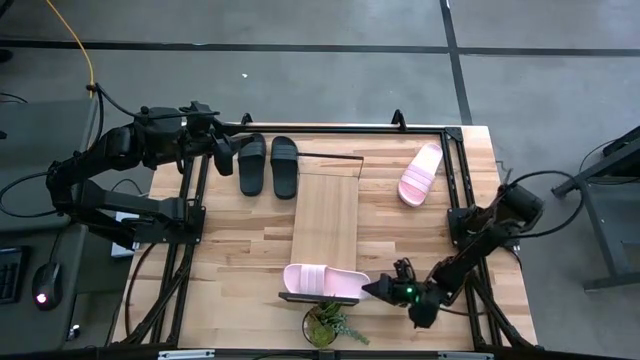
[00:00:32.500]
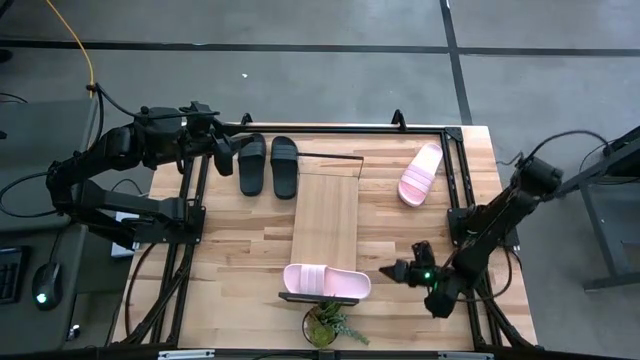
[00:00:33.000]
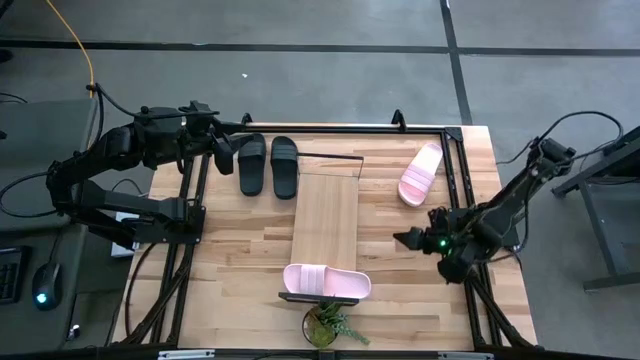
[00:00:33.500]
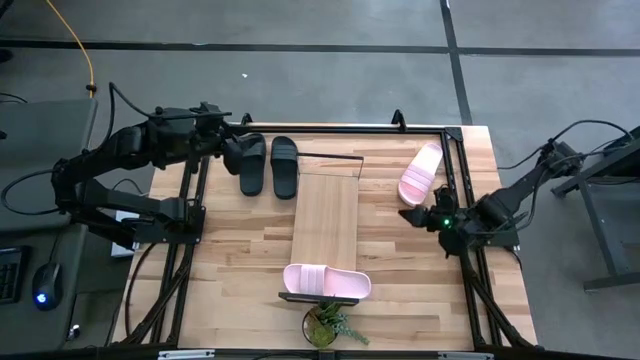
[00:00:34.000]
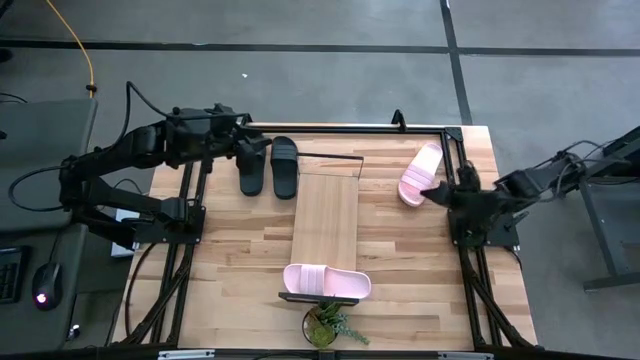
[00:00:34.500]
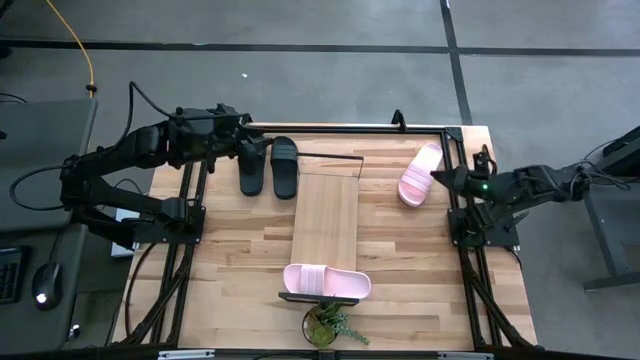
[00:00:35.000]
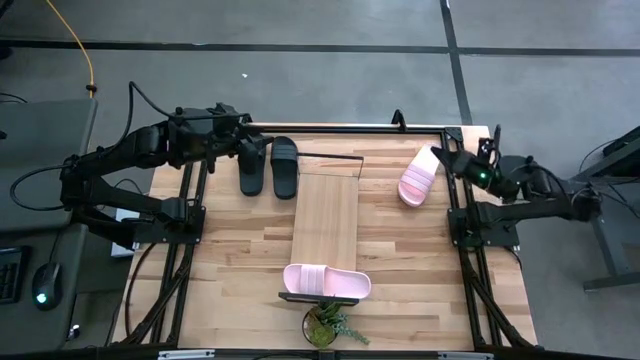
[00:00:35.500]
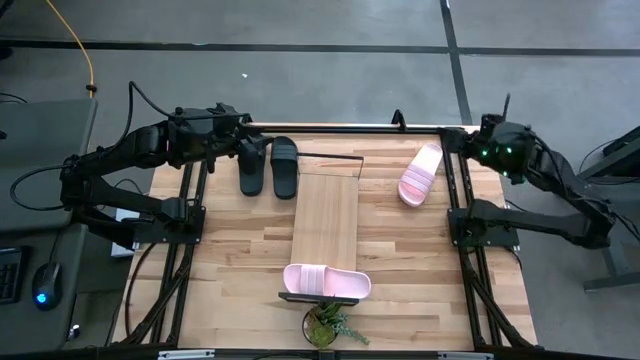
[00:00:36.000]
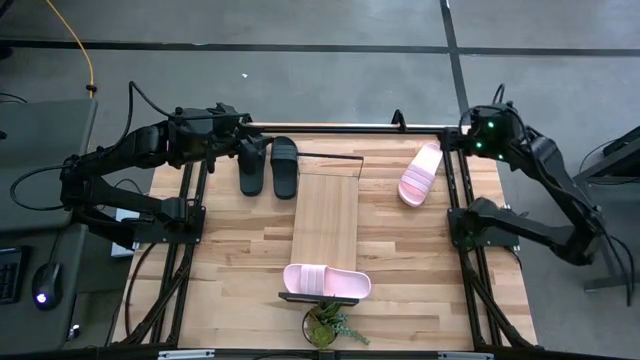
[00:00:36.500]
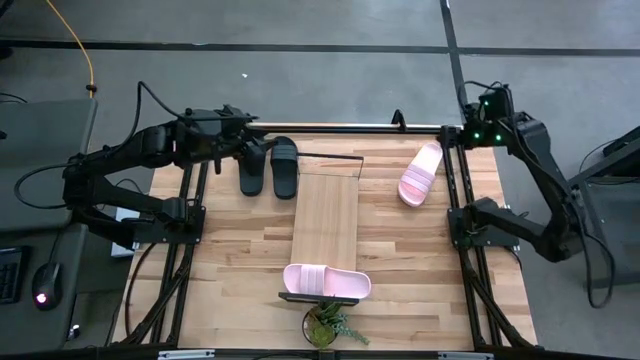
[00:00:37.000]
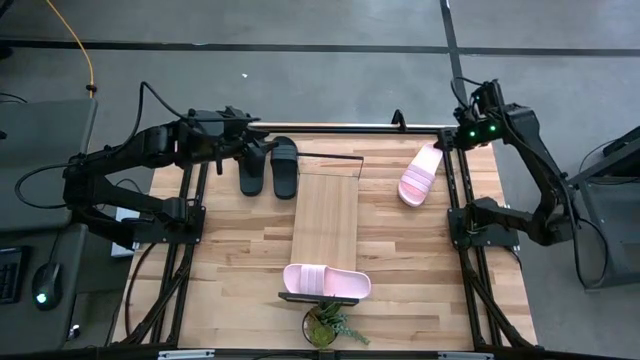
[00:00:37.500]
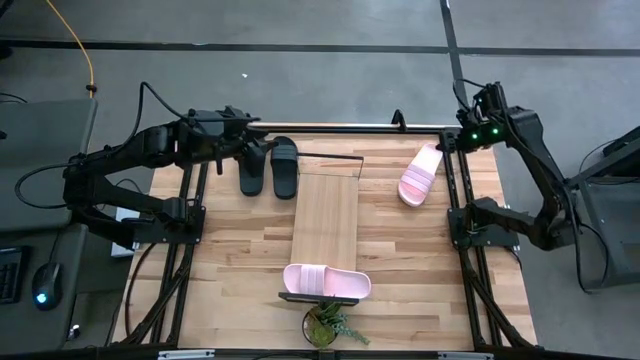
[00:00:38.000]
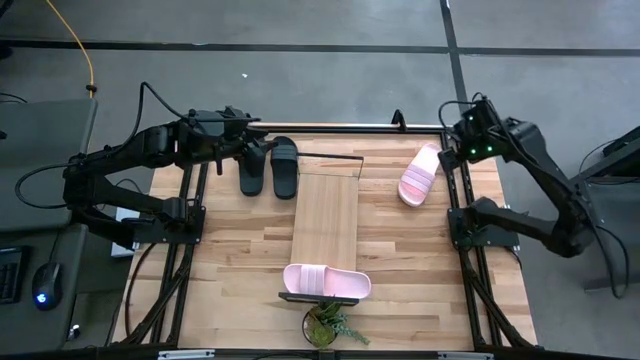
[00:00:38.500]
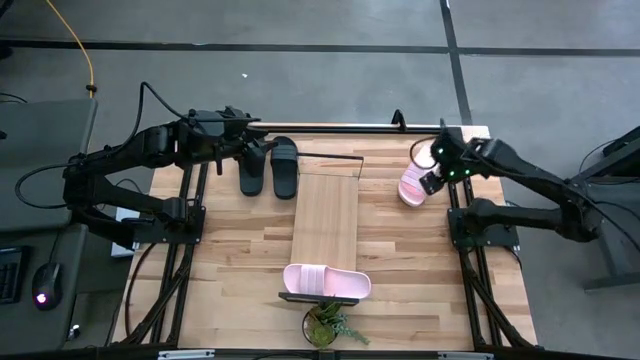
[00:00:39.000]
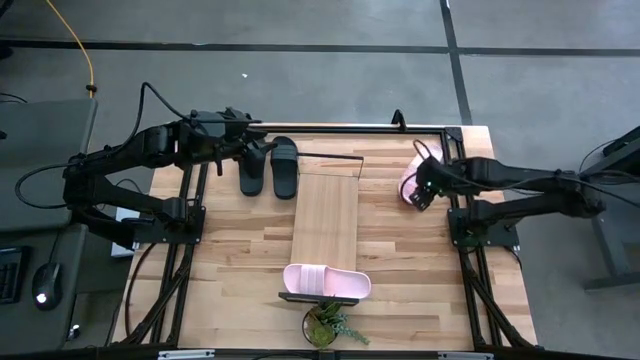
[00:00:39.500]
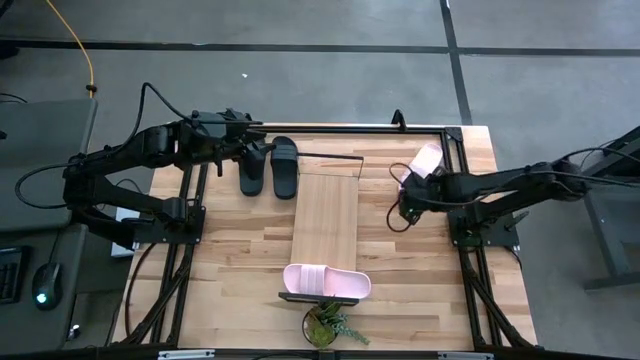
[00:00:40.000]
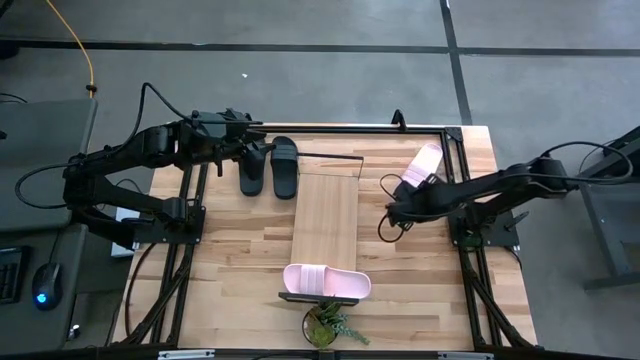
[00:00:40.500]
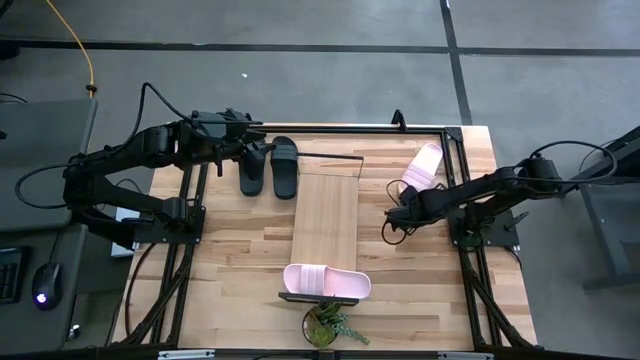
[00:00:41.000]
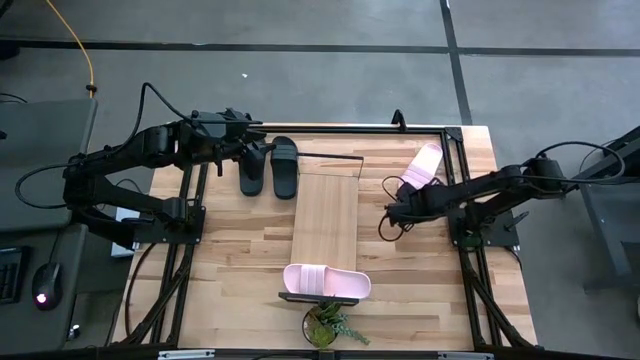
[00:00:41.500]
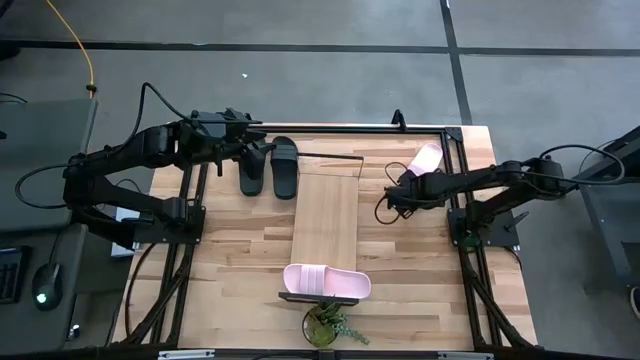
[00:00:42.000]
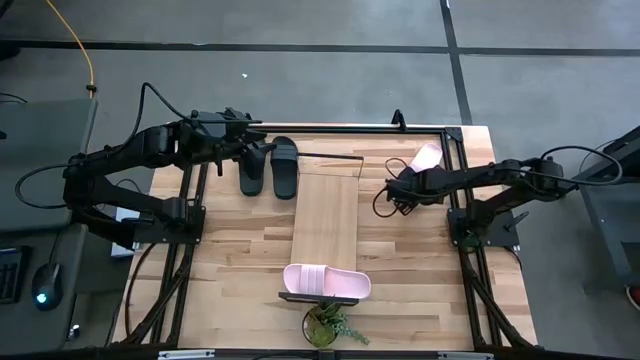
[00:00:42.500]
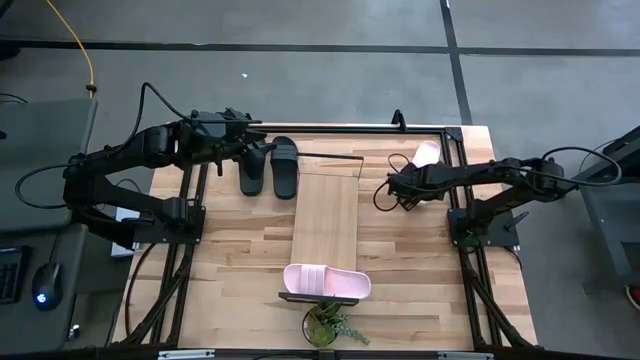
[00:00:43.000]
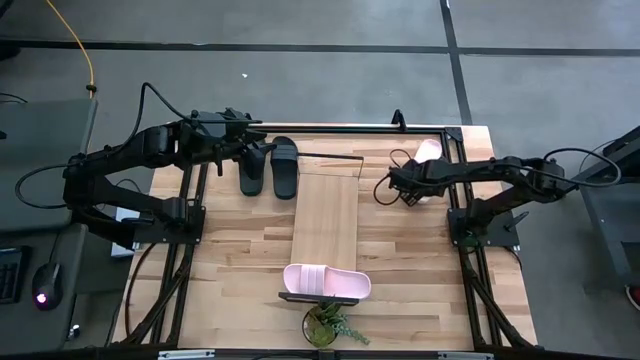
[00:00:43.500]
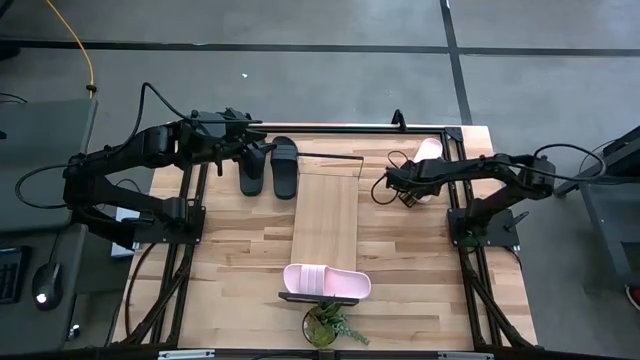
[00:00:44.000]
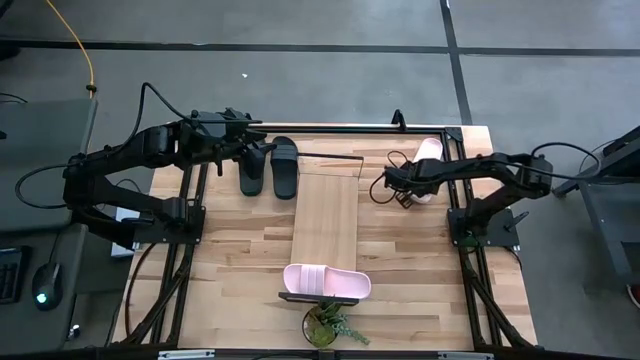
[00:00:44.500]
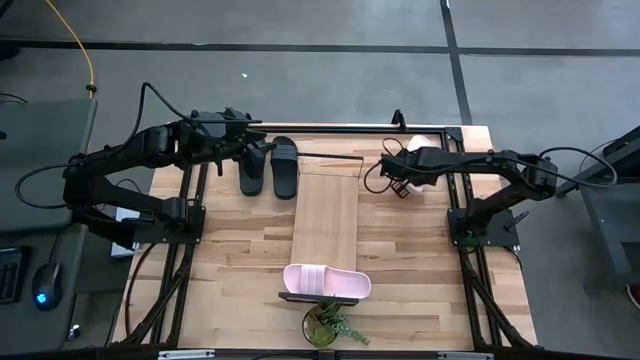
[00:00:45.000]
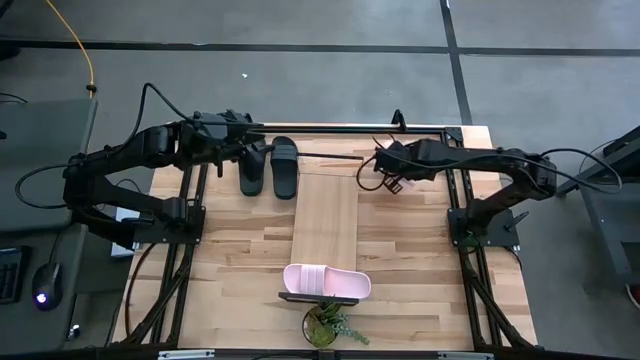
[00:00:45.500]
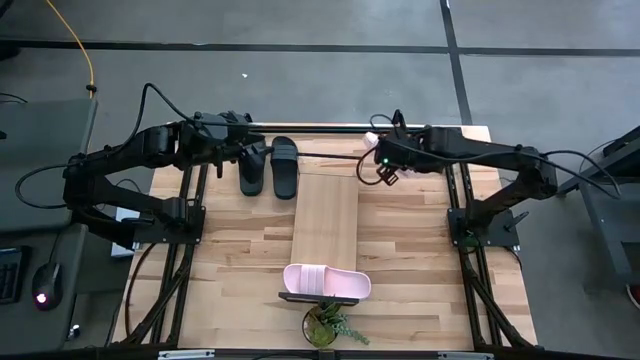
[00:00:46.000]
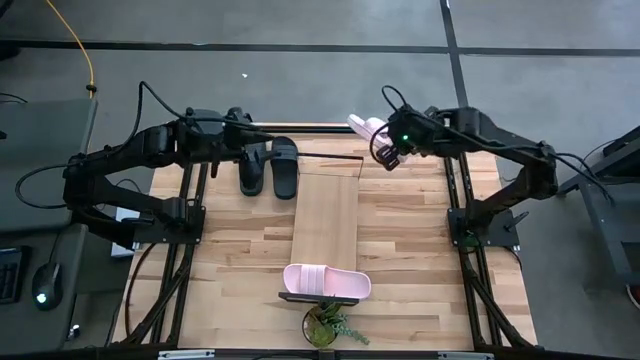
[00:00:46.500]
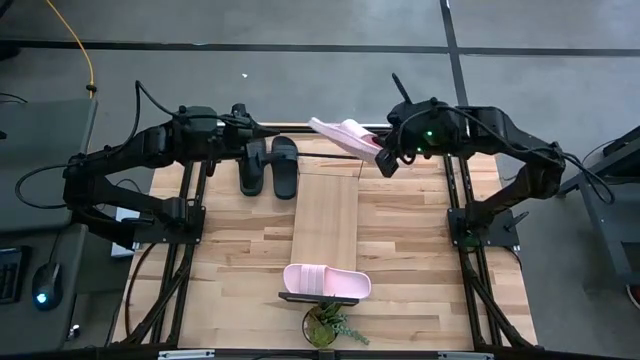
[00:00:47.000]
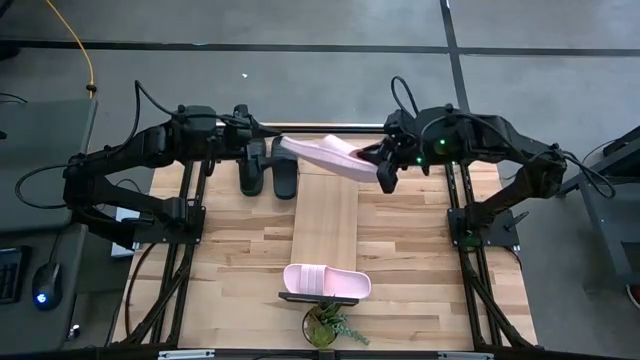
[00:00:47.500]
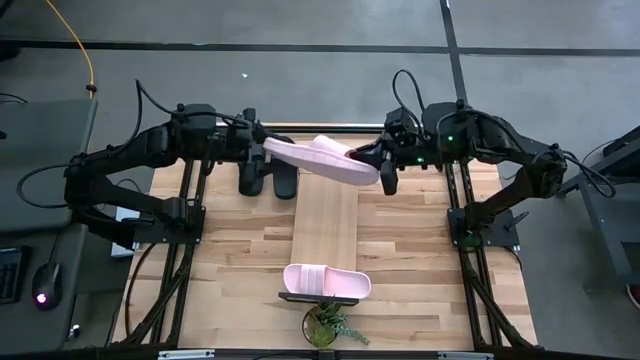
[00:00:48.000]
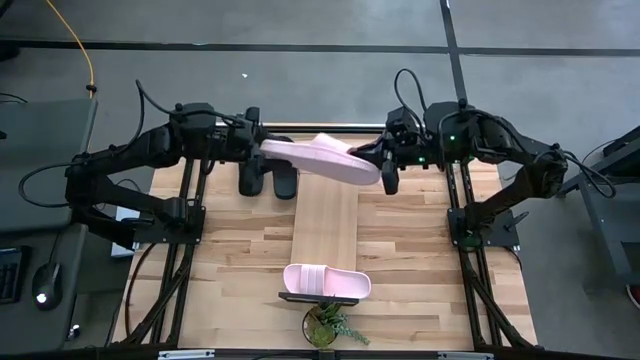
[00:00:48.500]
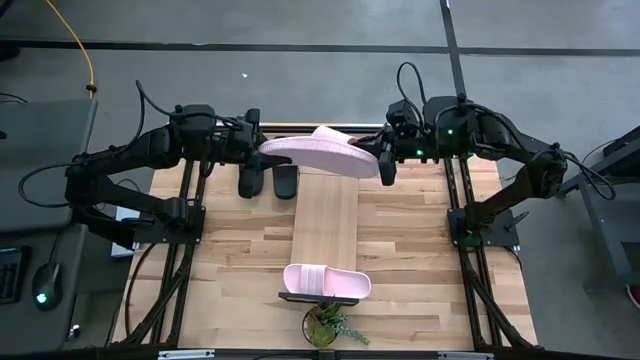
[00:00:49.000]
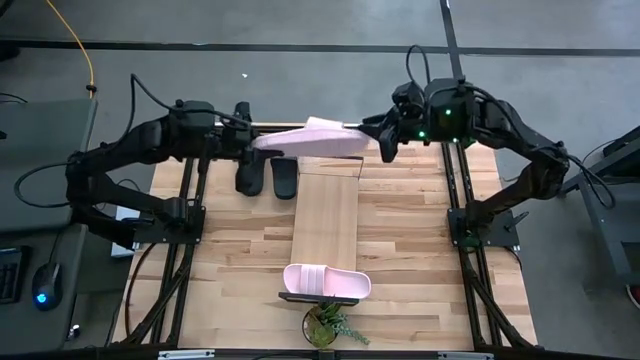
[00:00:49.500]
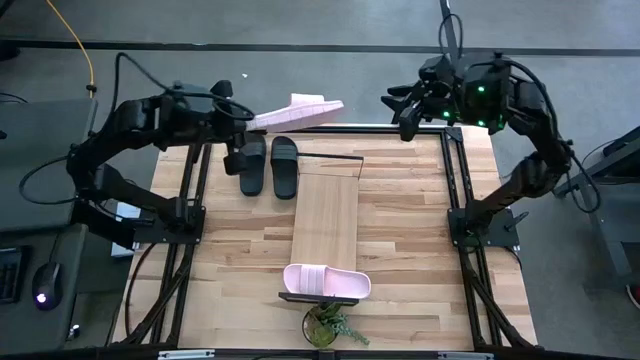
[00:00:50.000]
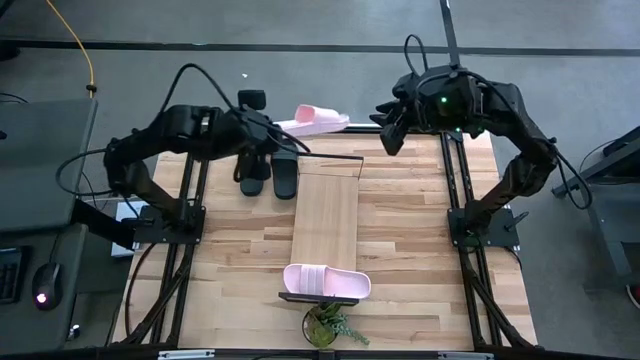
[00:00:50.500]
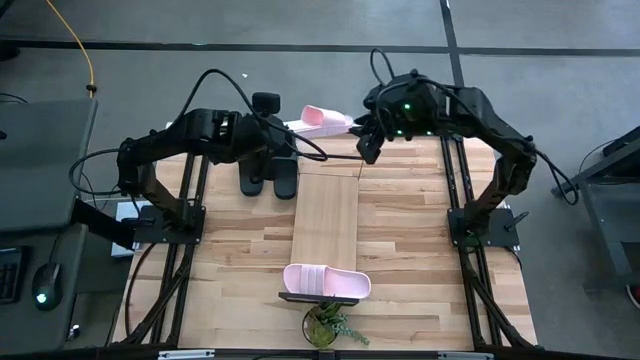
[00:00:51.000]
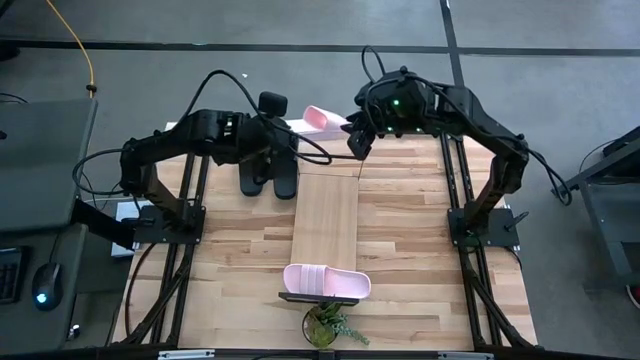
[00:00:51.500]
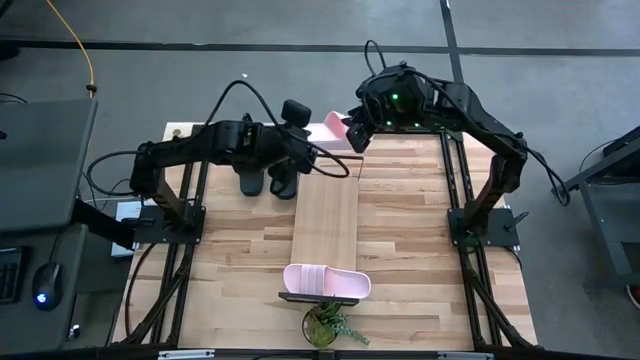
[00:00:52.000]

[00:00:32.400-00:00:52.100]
Task: Pick and place slides into the shelf
Put the pink slides on the shelf
